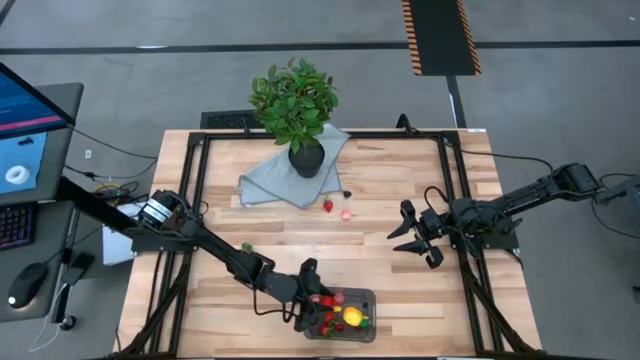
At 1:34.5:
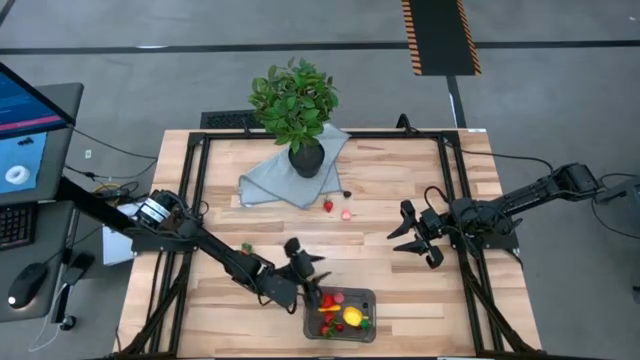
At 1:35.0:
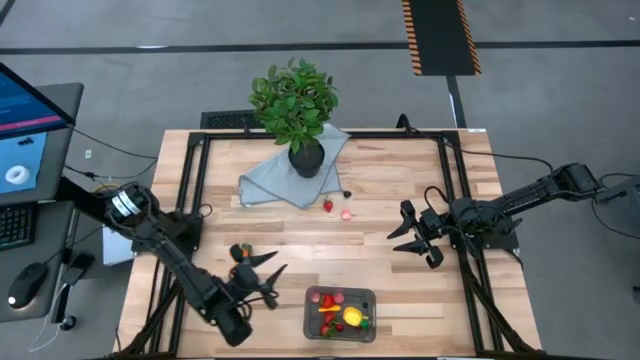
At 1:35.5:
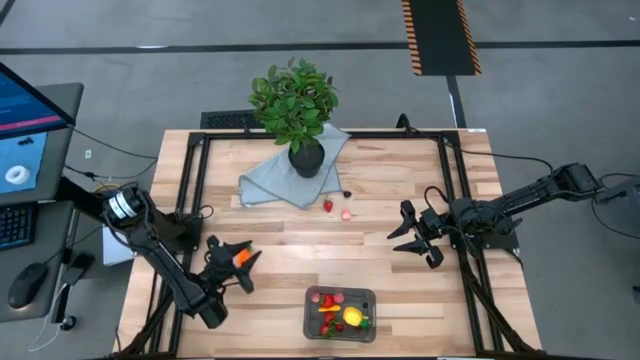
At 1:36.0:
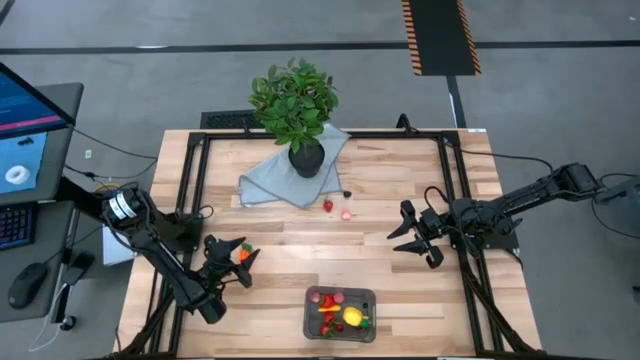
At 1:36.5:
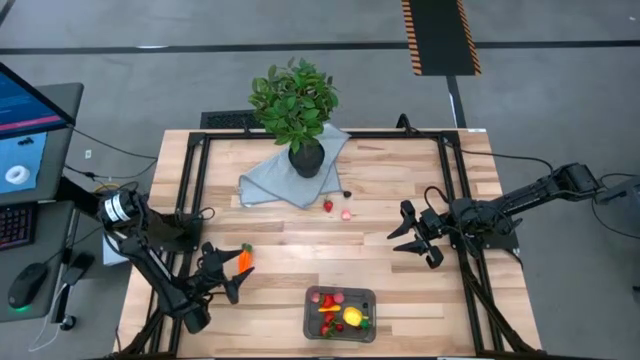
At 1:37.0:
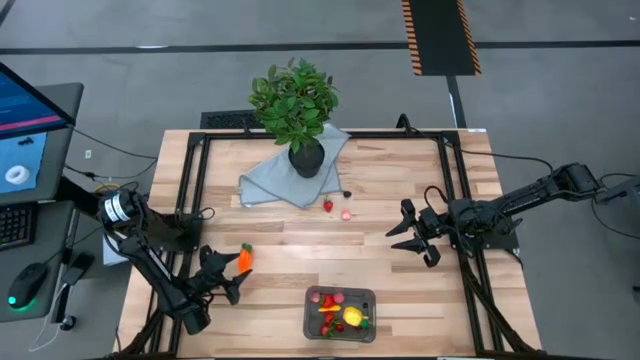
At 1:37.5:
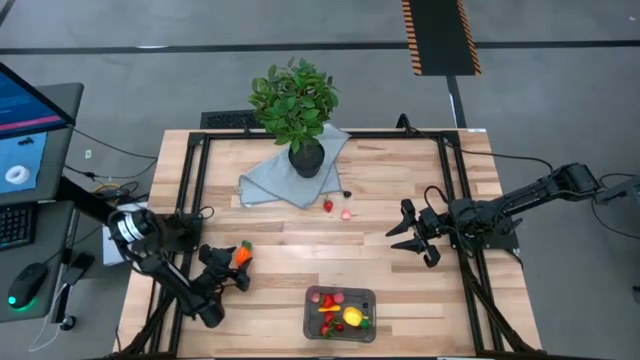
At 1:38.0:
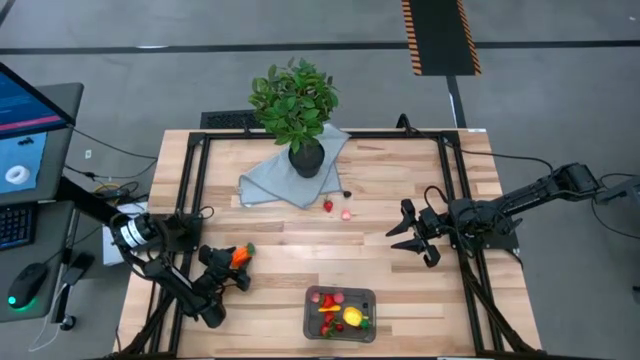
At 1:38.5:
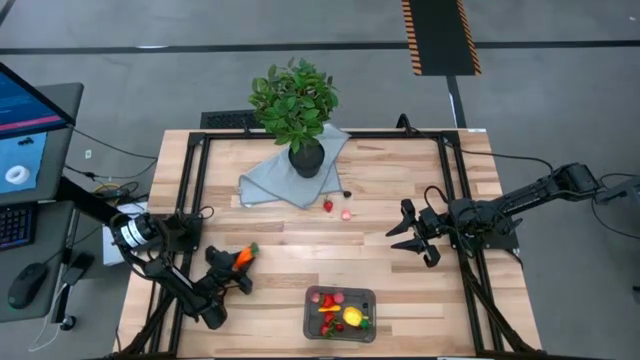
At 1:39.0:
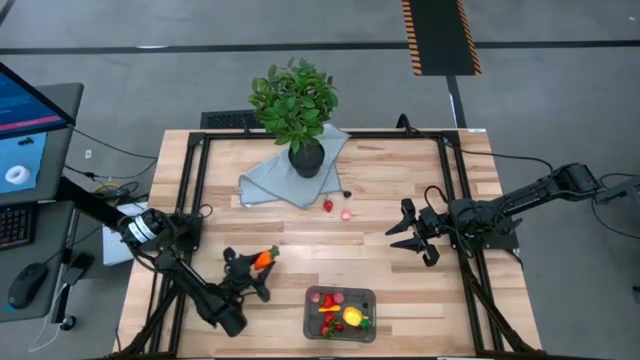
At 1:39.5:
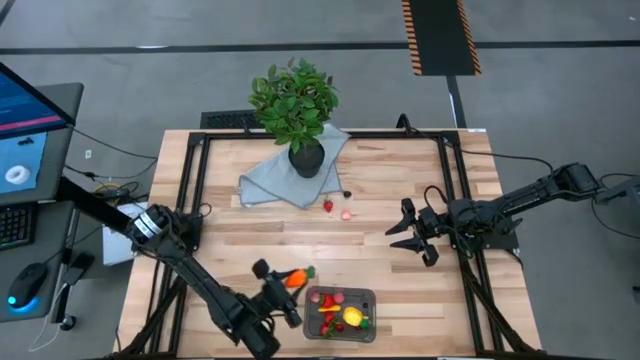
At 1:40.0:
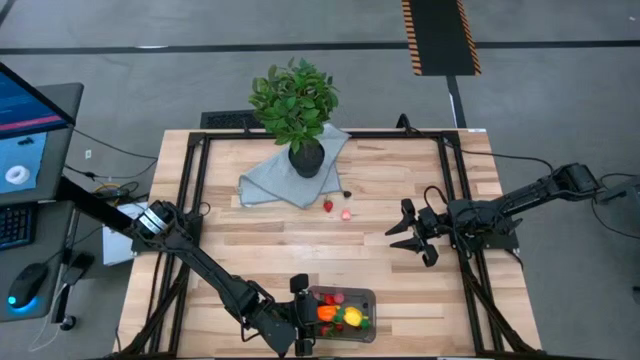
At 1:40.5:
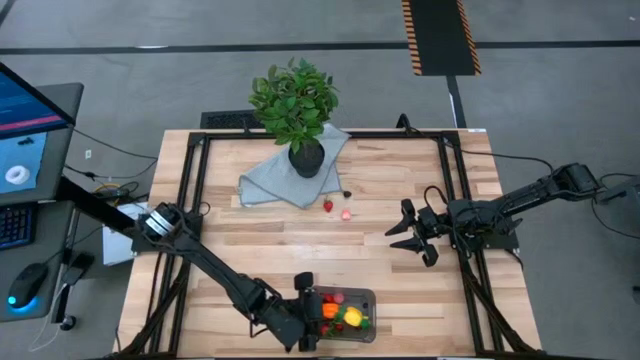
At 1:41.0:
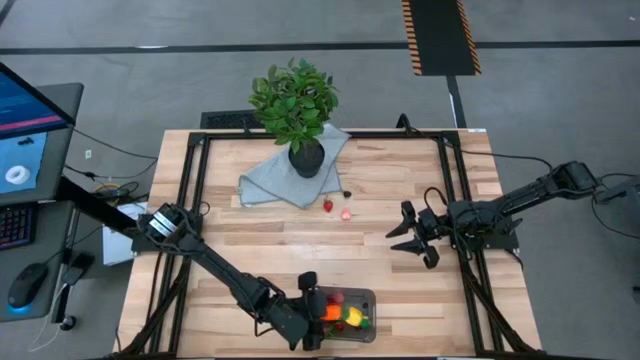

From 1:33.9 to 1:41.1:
Task: Pick and placing Produce into tupperware
Put the orange carrot into the black bin

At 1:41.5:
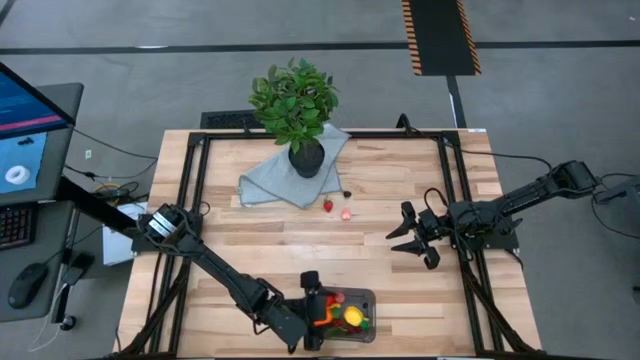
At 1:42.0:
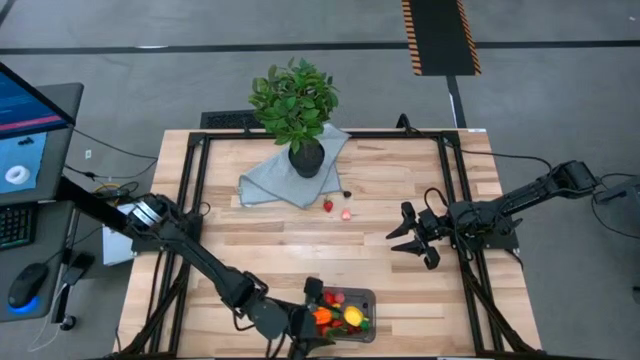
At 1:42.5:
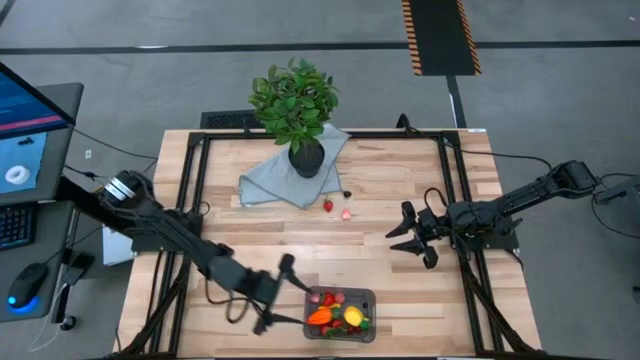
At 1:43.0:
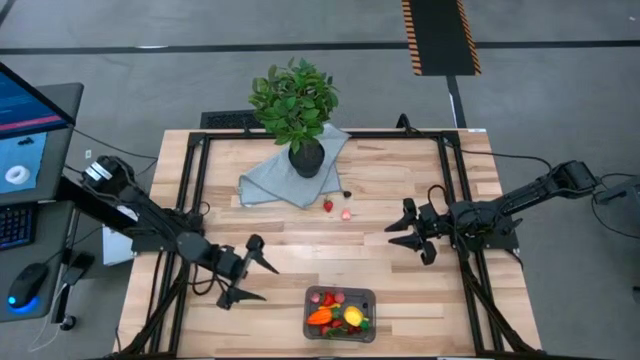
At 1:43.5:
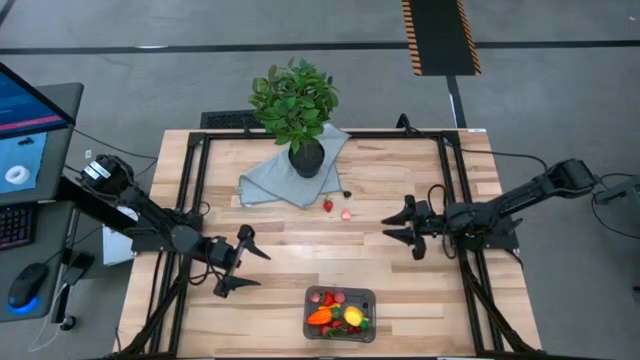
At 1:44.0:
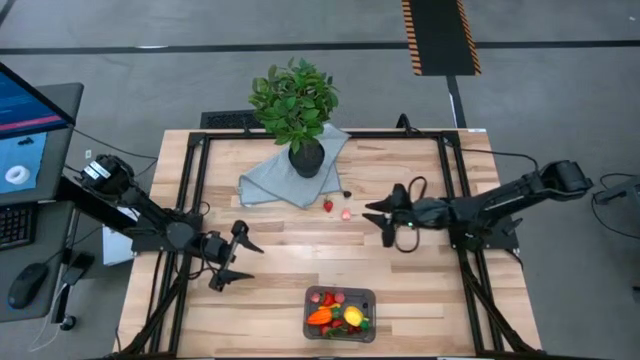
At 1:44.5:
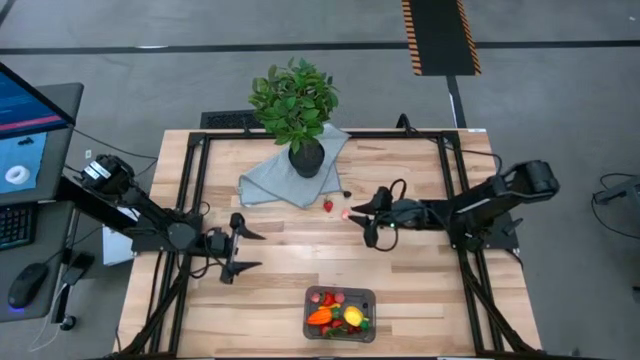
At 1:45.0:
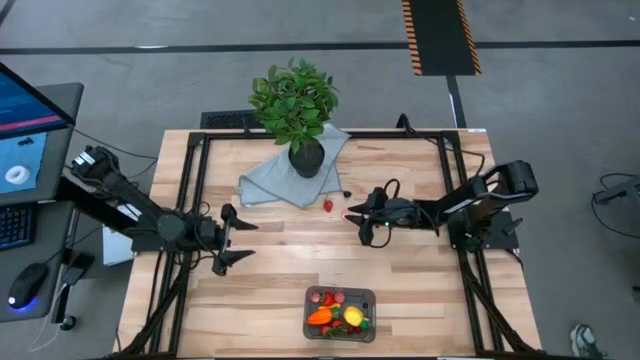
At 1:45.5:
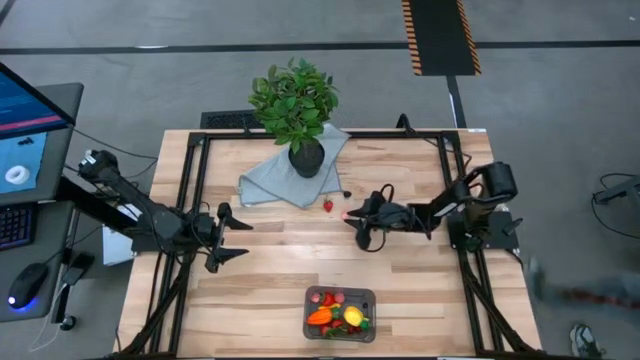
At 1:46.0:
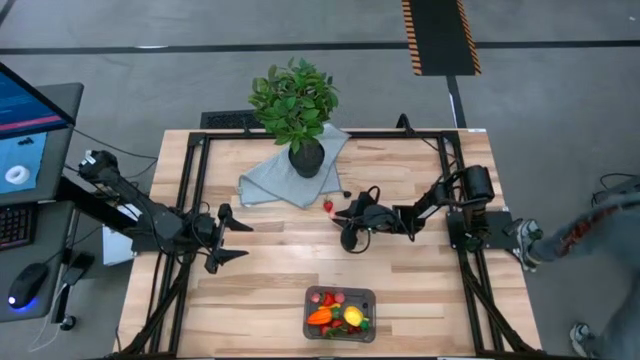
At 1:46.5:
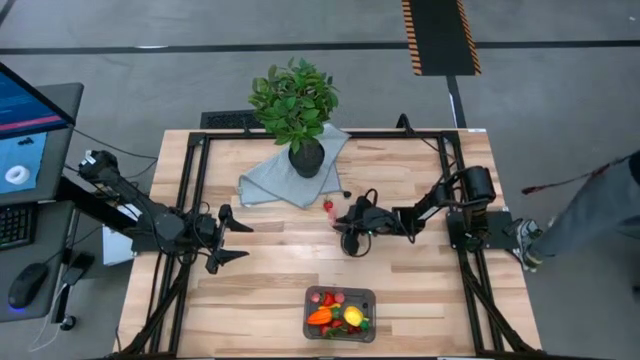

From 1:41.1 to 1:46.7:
Put the pink peach into the black bin

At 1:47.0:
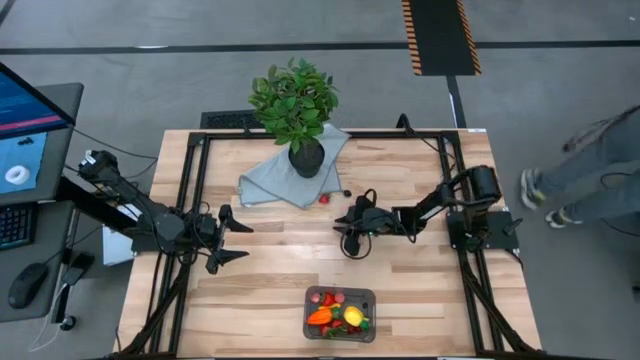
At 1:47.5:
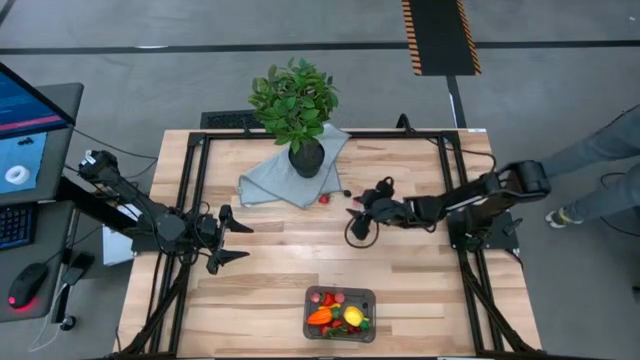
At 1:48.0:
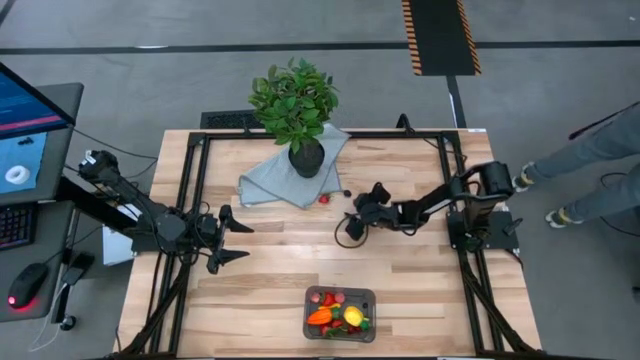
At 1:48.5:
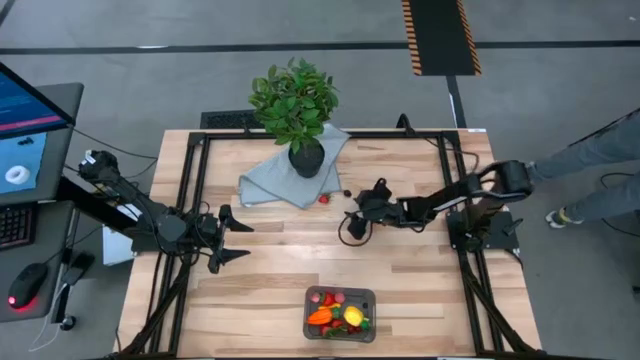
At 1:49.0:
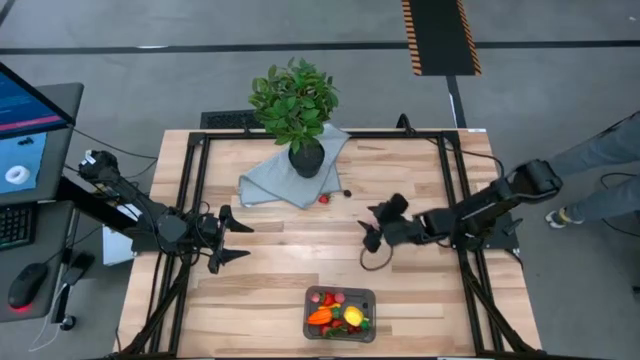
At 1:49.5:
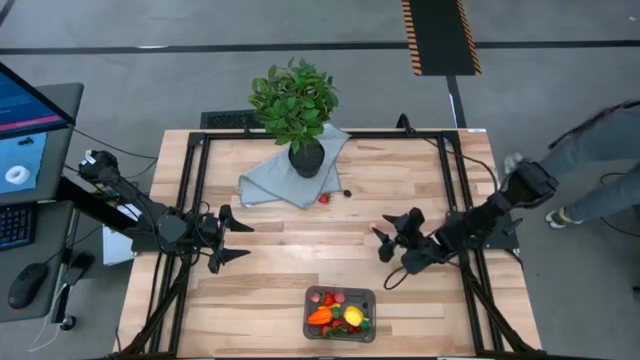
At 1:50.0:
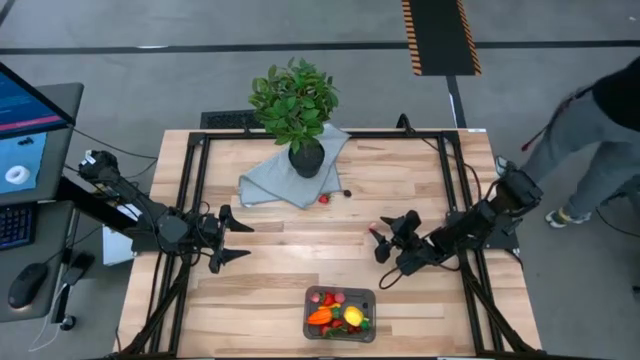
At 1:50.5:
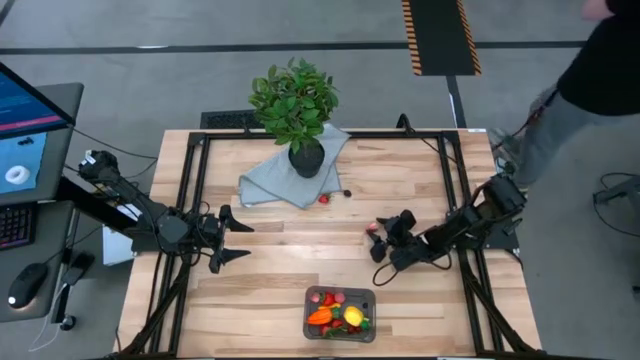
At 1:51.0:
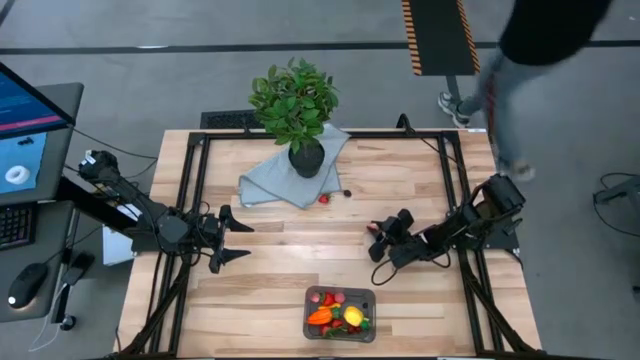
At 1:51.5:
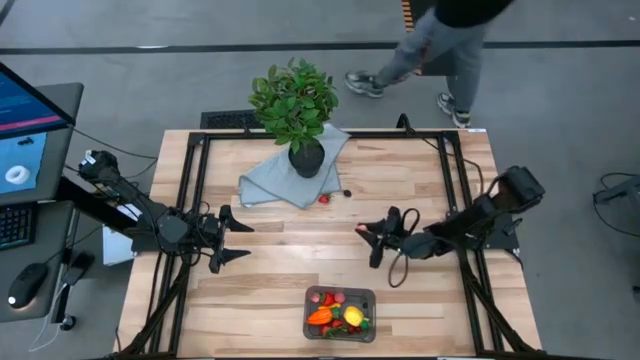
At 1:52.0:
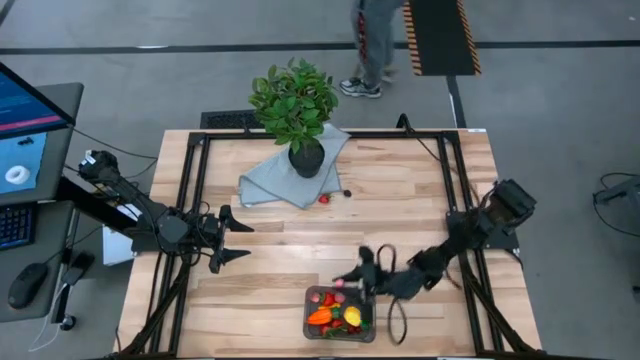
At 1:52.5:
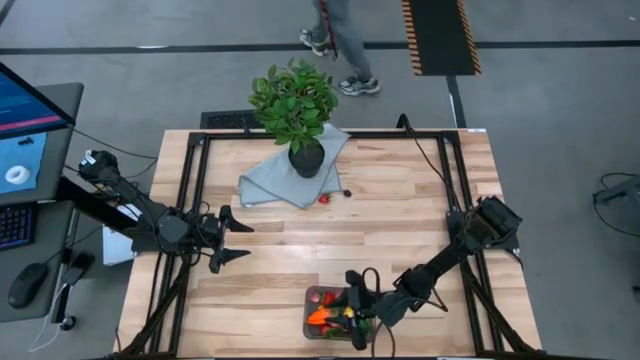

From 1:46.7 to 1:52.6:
Put the pink peach into the black bin
